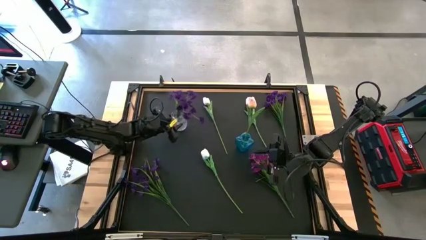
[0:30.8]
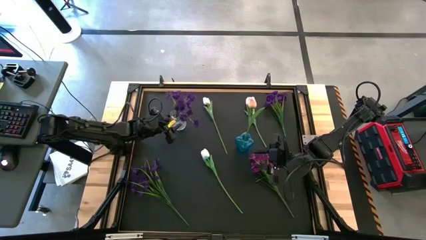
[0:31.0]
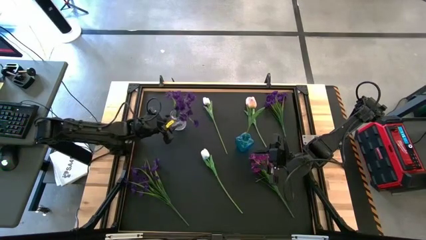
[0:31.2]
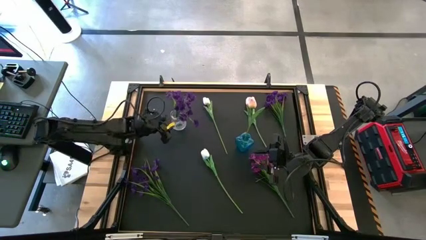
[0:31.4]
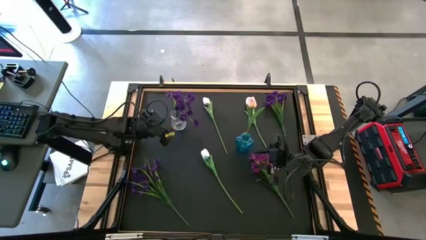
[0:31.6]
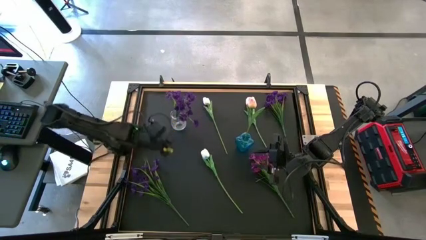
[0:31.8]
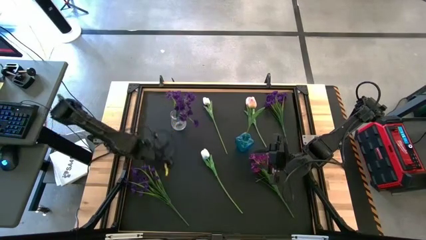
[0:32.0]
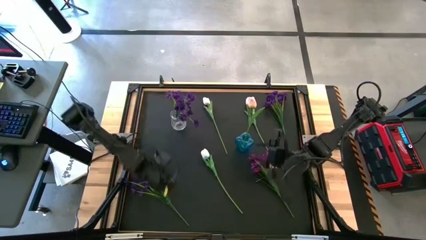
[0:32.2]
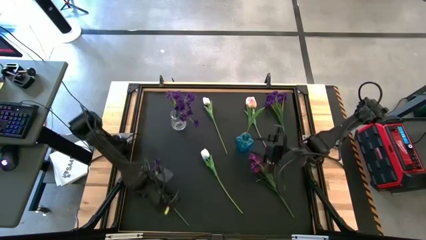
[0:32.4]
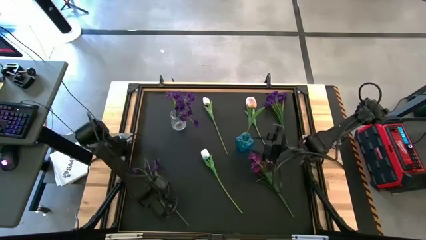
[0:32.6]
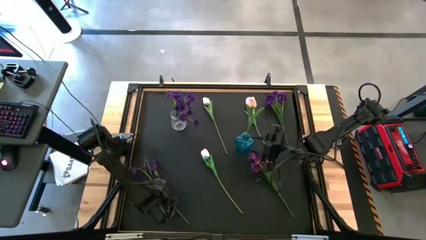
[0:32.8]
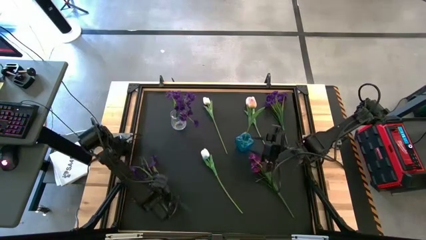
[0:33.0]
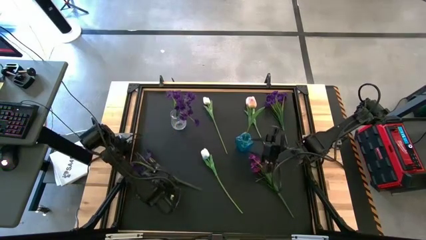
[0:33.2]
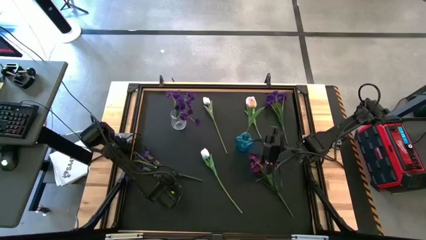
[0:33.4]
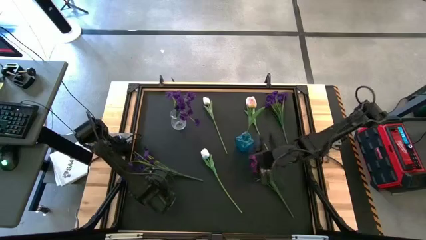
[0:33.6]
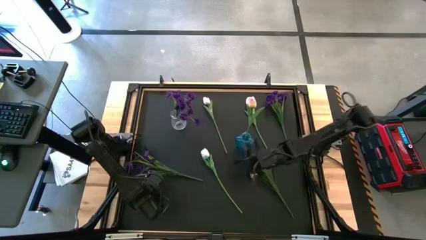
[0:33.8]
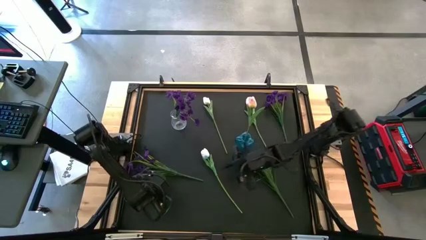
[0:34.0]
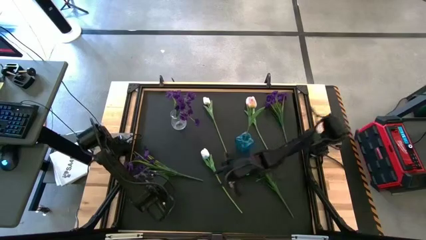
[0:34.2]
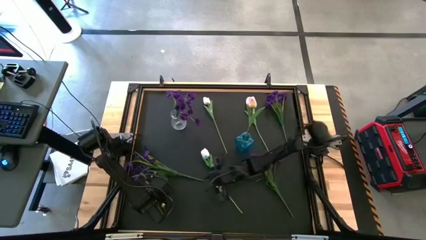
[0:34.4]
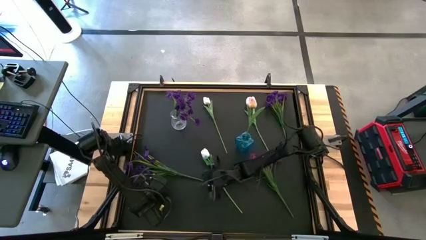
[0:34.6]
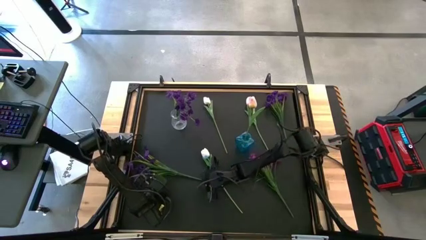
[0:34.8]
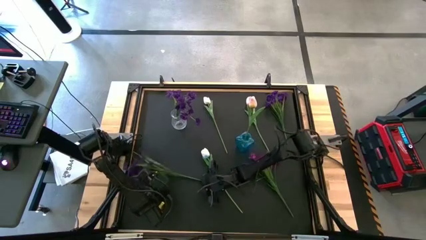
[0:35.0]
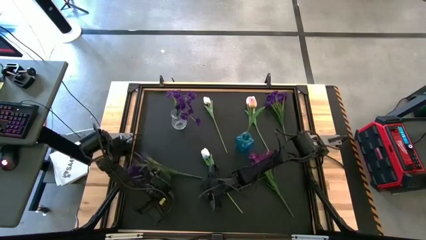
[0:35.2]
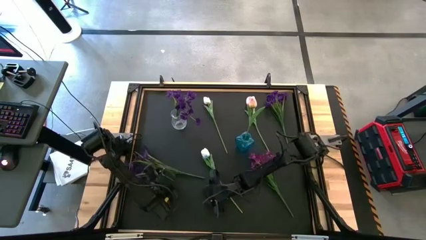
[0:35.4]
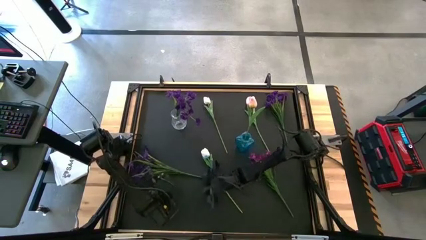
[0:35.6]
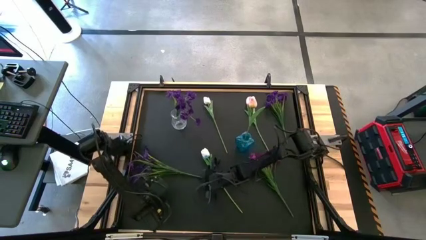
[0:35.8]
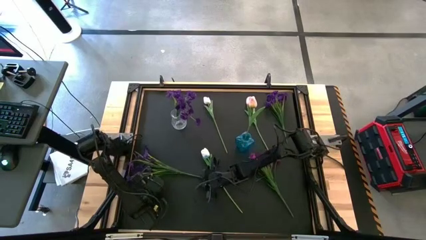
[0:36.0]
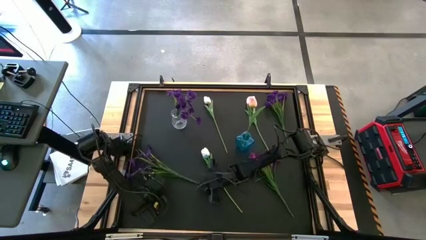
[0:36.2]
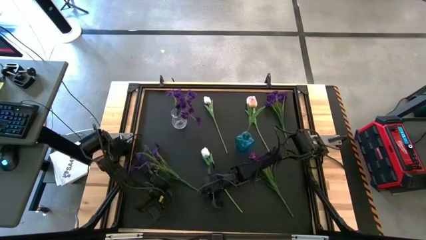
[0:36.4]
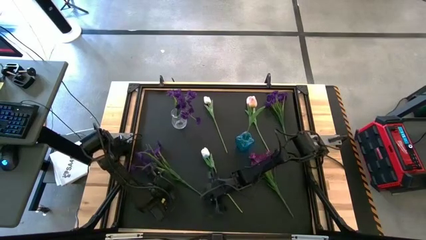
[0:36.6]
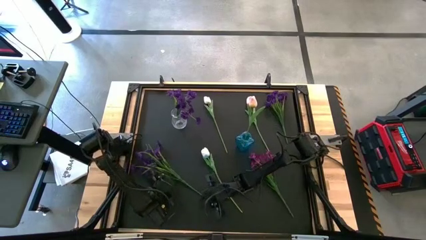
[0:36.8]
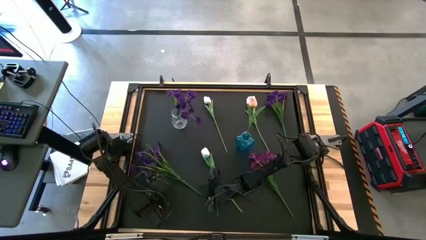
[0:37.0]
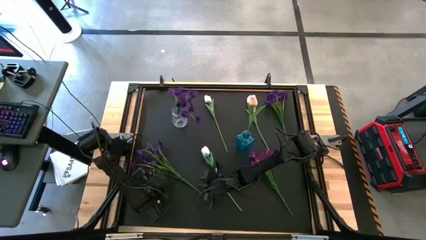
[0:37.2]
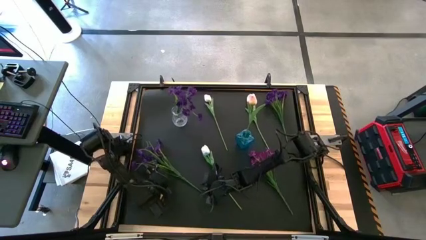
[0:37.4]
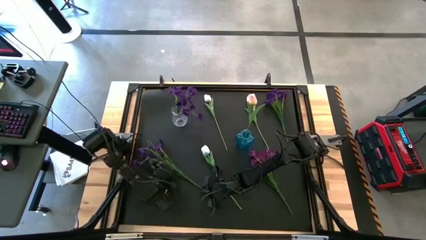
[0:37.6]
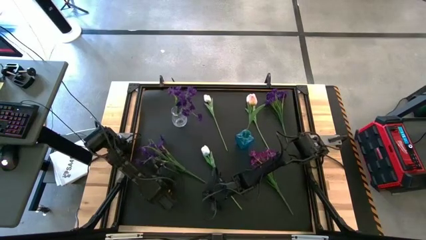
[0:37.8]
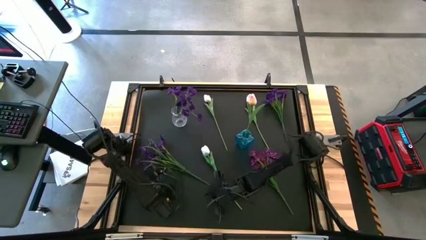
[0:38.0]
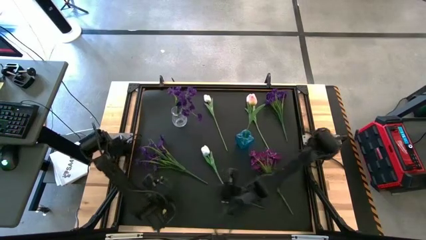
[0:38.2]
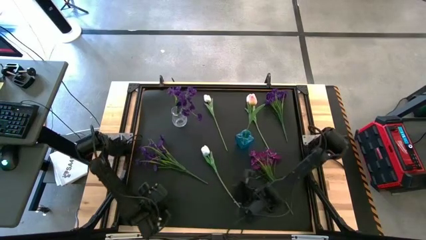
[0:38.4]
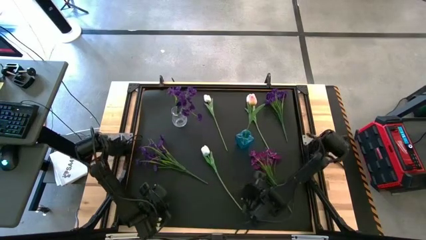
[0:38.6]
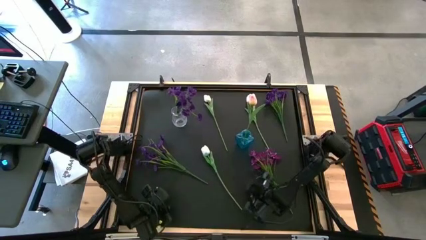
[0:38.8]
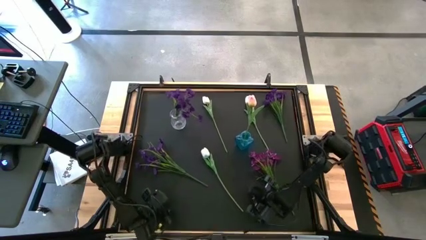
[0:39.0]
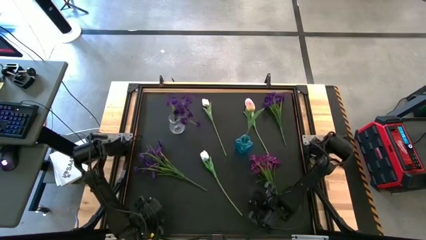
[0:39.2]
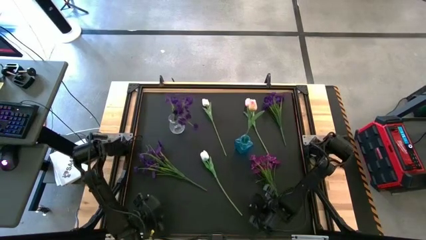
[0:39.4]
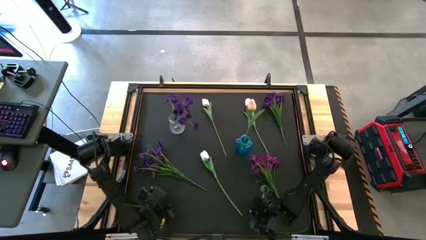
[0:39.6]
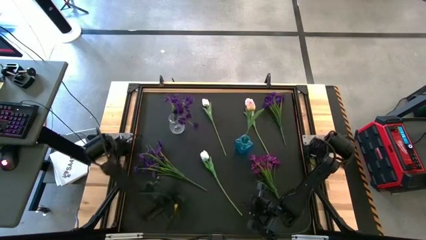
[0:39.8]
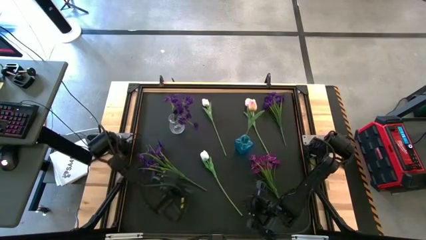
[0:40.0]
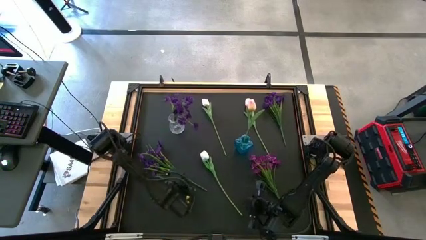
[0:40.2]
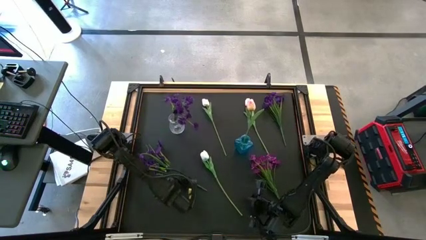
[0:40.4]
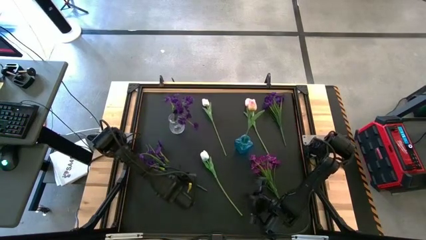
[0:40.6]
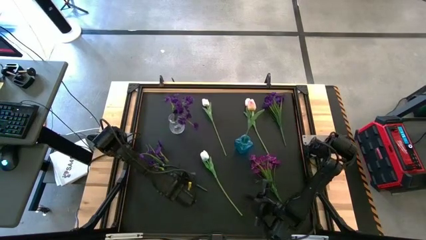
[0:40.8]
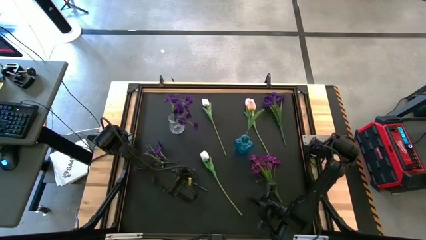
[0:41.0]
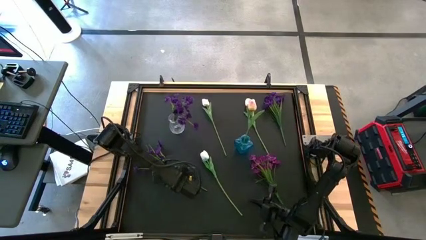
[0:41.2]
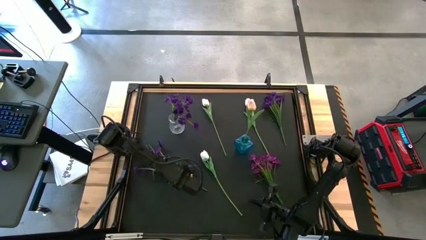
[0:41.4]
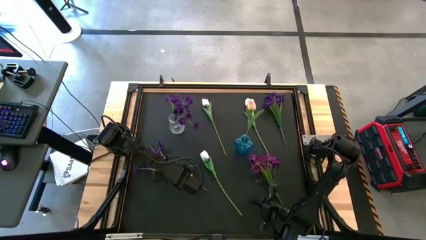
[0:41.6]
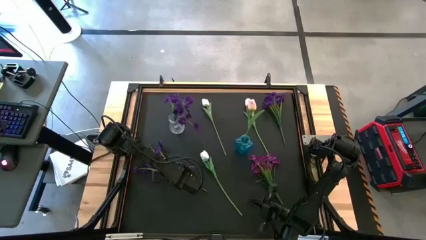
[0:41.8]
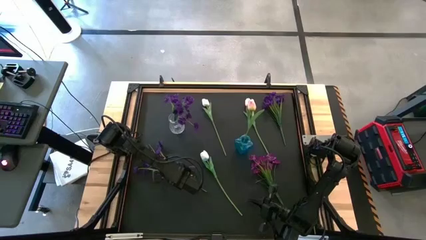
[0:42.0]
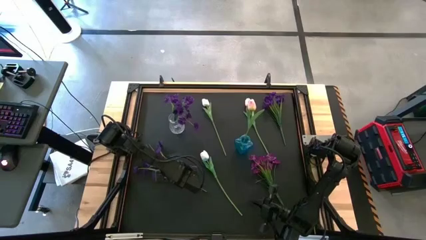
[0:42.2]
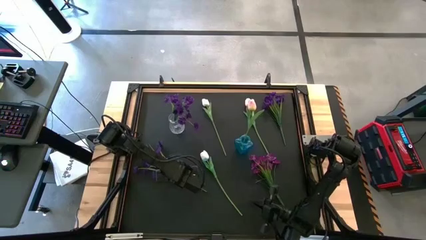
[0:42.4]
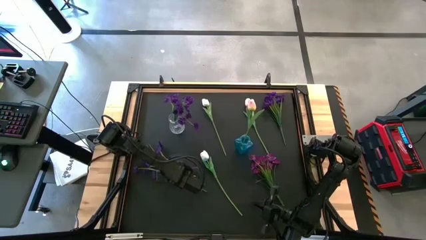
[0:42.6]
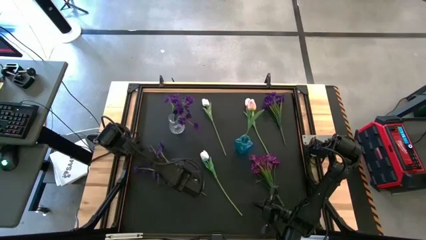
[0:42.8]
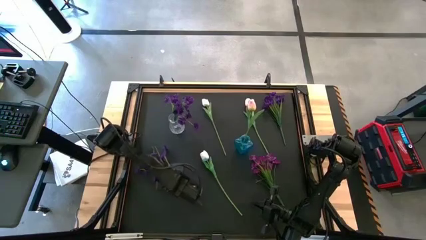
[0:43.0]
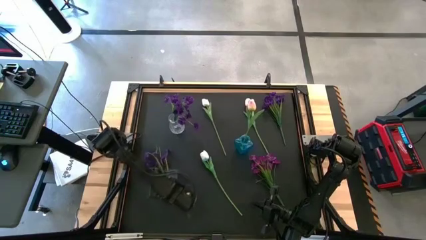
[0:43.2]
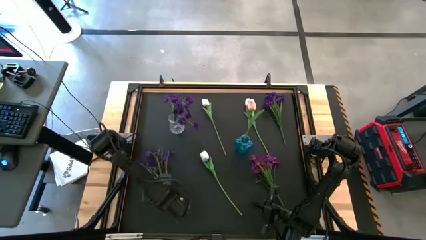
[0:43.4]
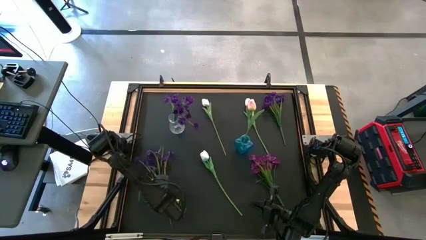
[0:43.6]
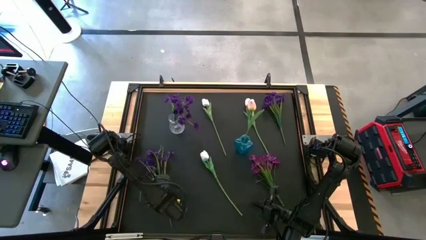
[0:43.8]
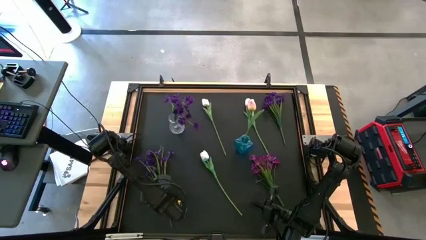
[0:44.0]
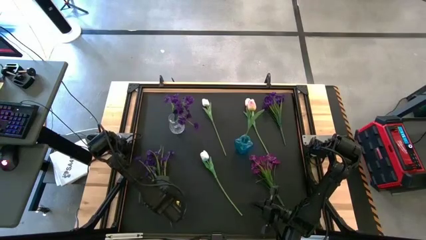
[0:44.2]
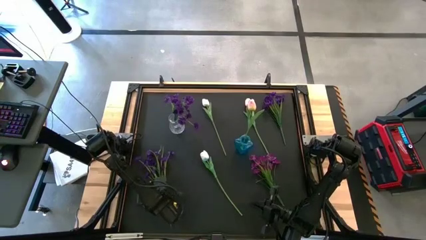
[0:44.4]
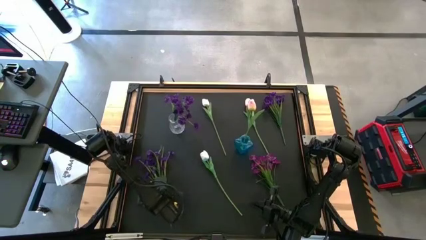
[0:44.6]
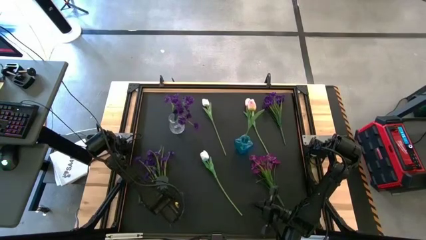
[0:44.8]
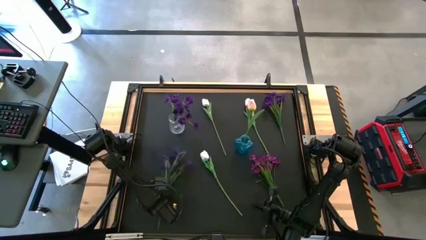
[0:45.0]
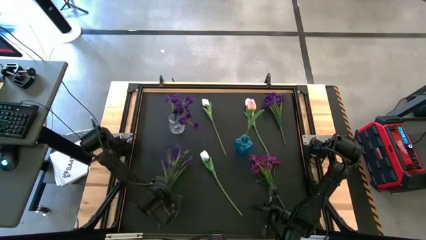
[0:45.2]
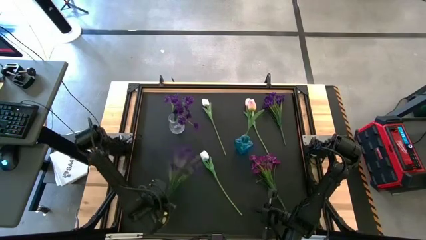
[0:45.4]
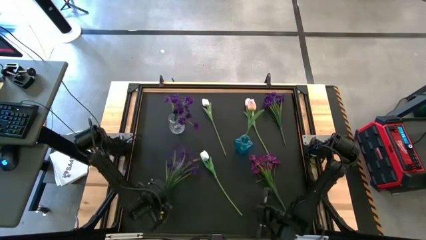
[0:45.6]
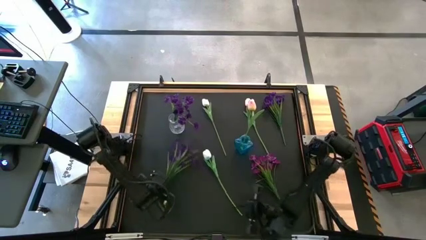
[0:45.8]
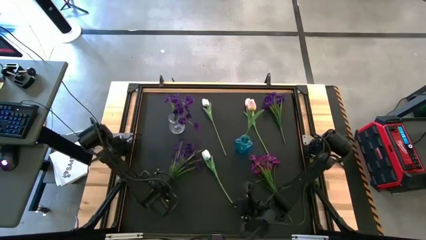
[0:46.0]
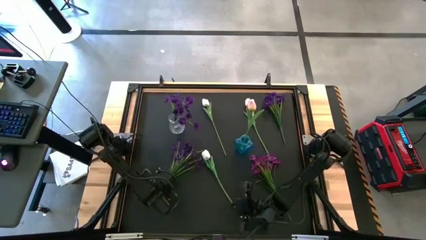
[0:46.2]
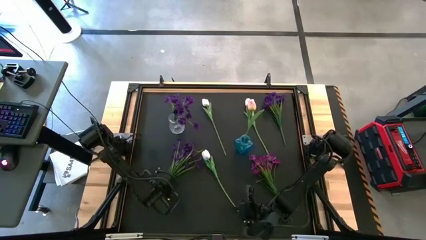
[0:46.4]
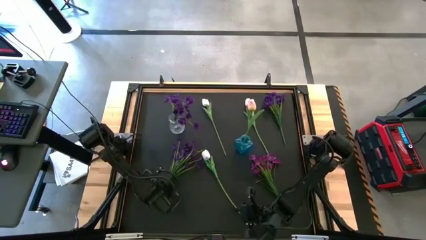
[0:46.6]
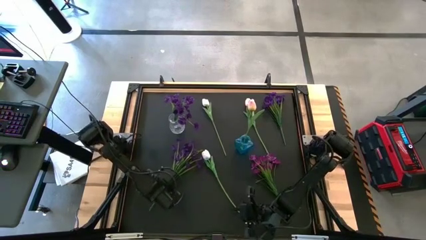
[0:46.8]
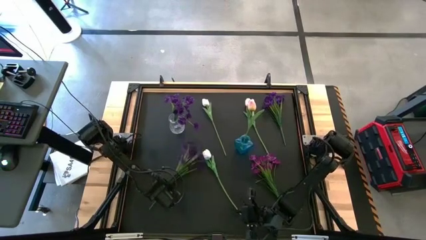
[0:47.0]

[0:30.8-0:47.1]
Task: Sort flowers into vase by color
Put the bottom purple flowers into the transparent vase

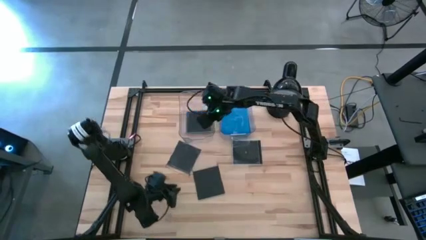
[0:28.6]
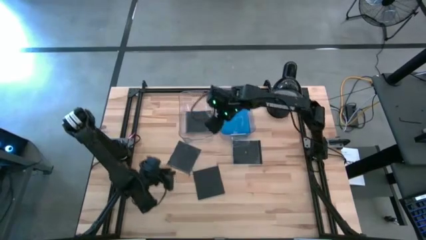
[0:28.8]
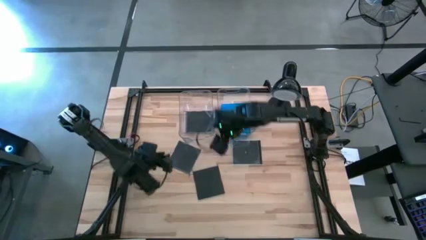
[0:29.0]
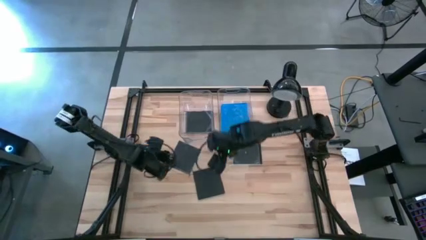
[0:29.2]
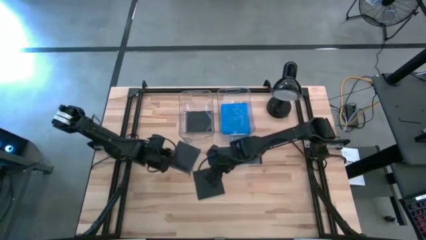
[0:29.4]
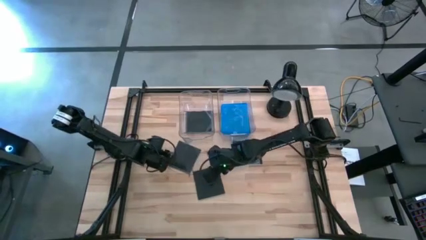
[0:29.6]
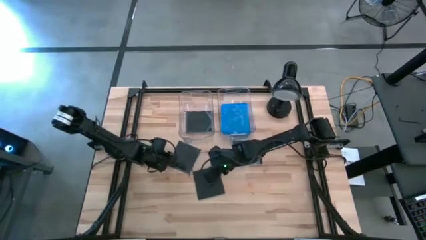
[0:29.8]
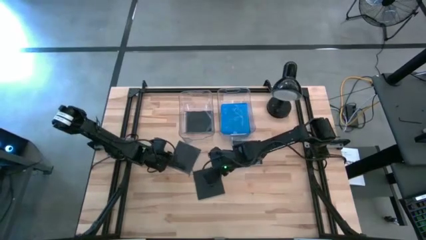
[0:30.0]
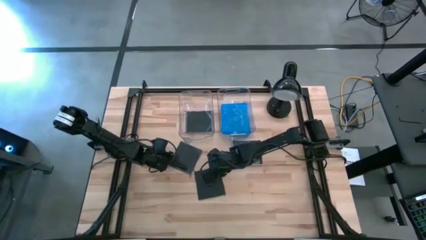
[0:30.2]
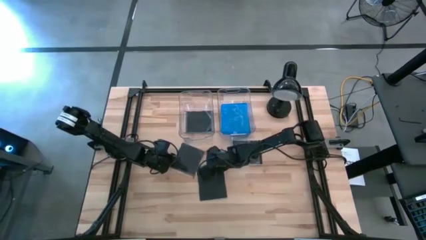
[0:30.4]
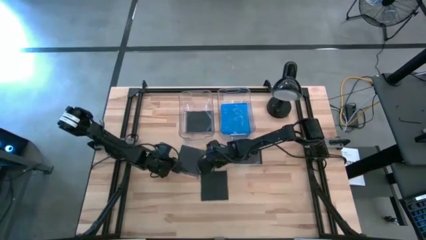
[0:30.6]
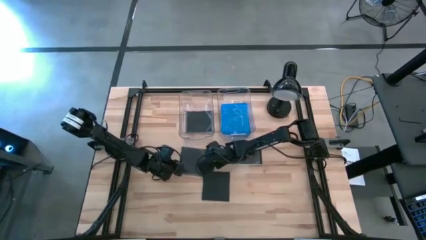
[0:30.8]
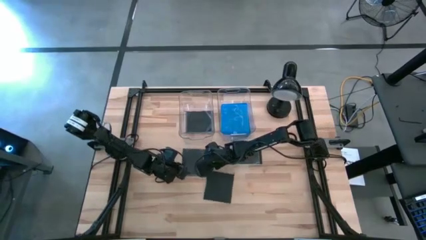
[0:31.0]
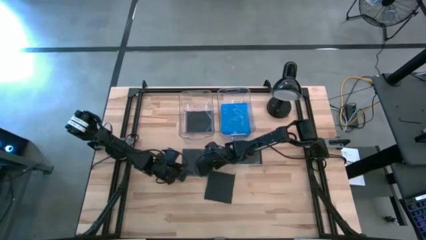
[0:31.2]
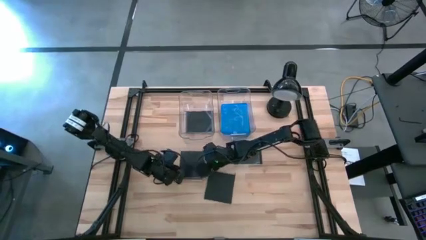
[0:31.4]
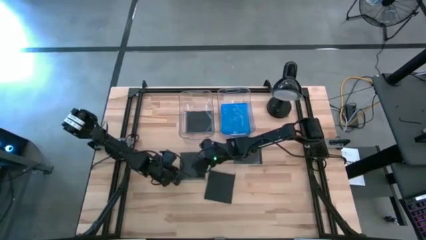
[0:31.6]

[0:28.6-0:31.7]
Task: Pick & place jewel cases by type
Put the top left black CD case into the left transparent bin
